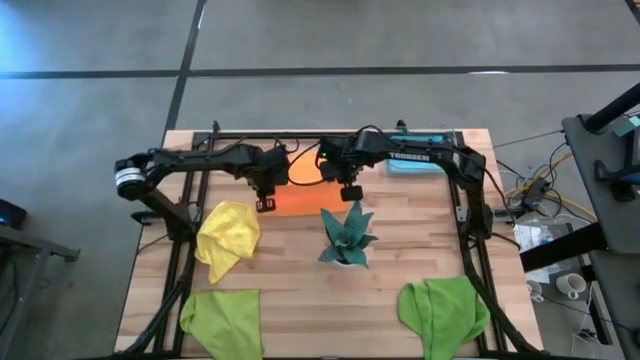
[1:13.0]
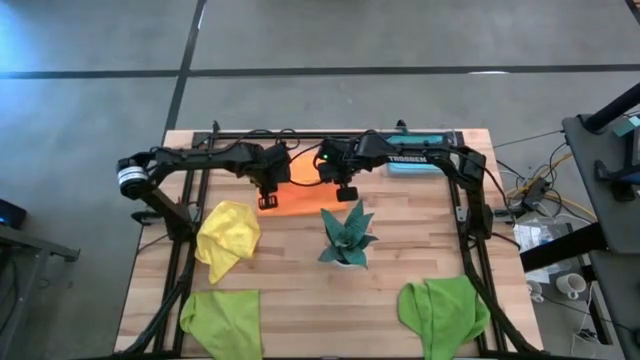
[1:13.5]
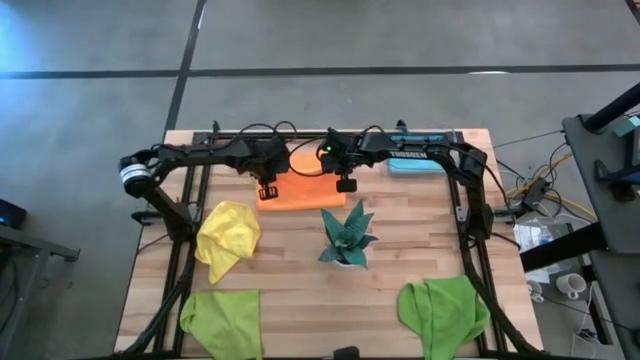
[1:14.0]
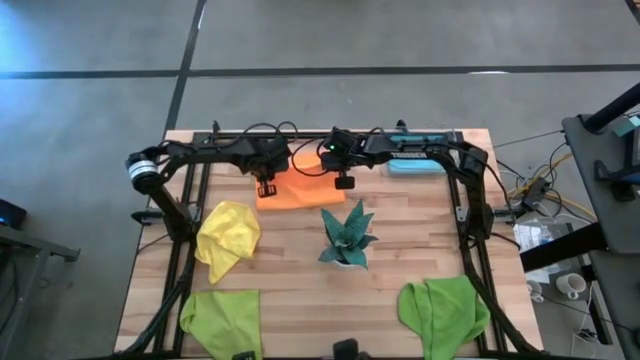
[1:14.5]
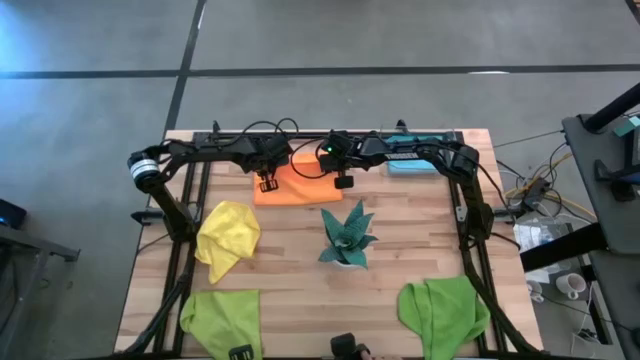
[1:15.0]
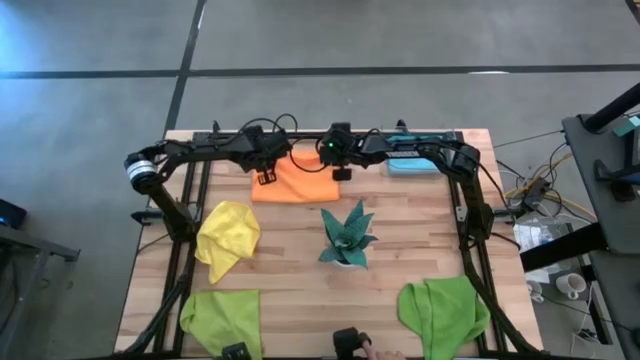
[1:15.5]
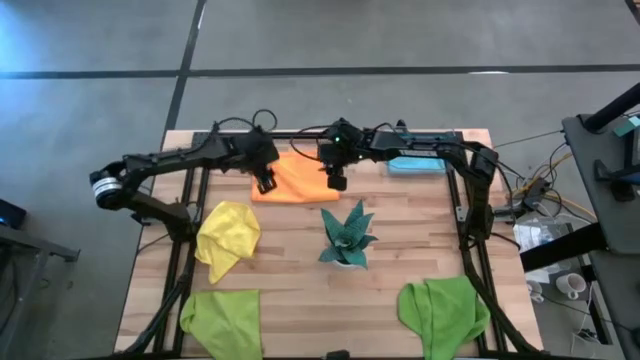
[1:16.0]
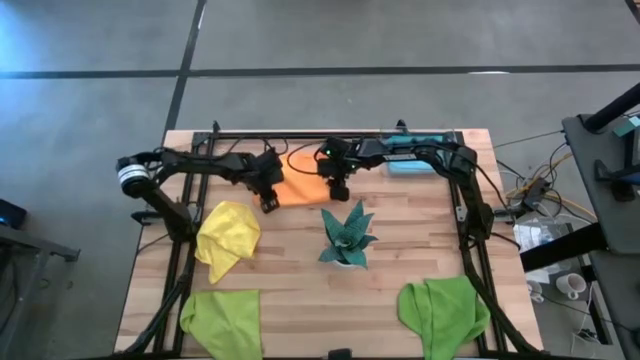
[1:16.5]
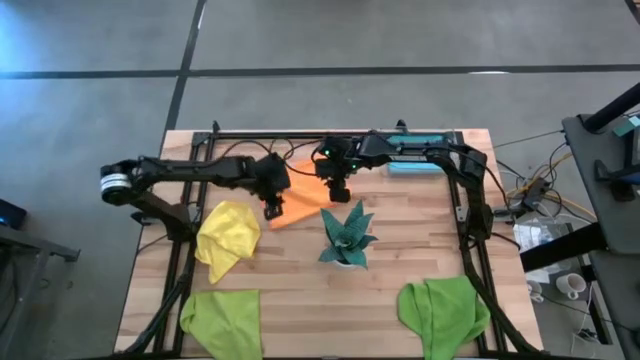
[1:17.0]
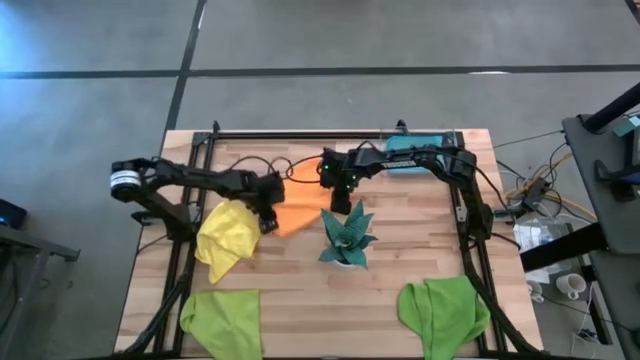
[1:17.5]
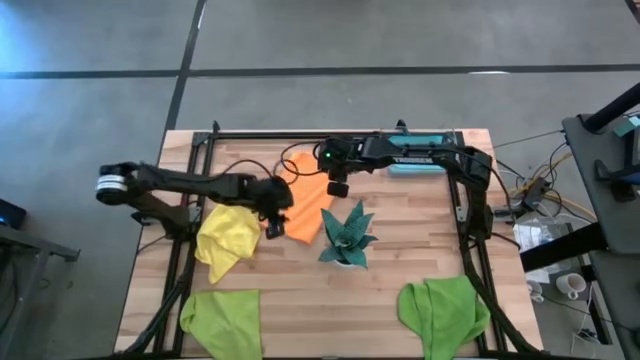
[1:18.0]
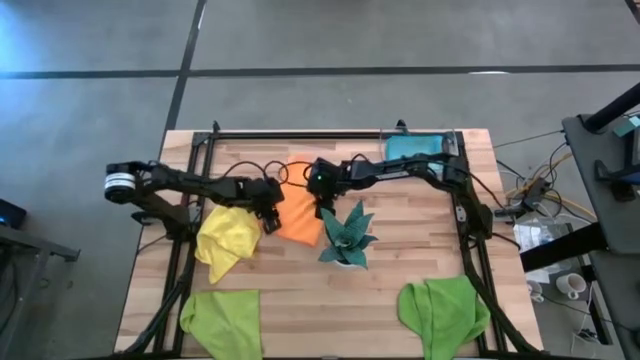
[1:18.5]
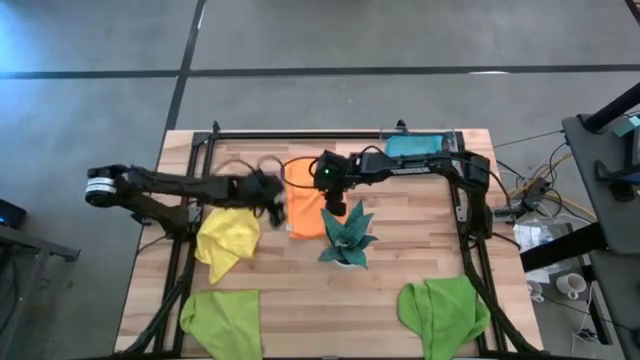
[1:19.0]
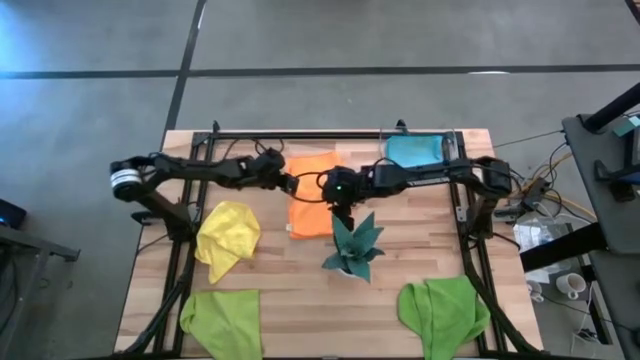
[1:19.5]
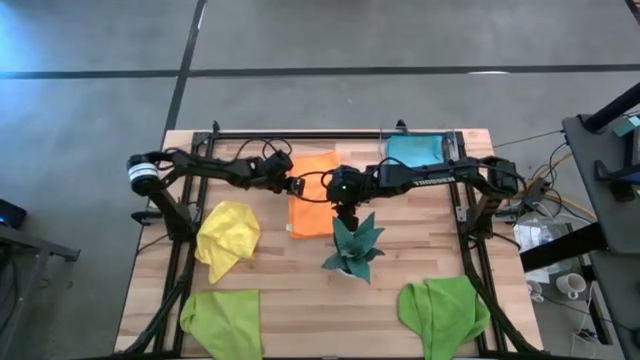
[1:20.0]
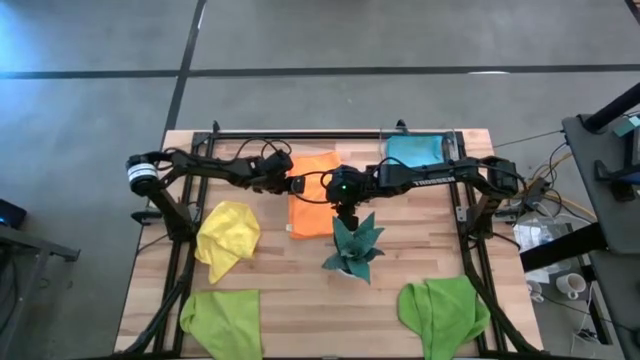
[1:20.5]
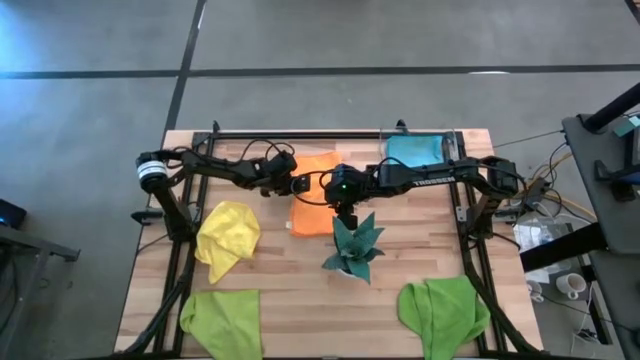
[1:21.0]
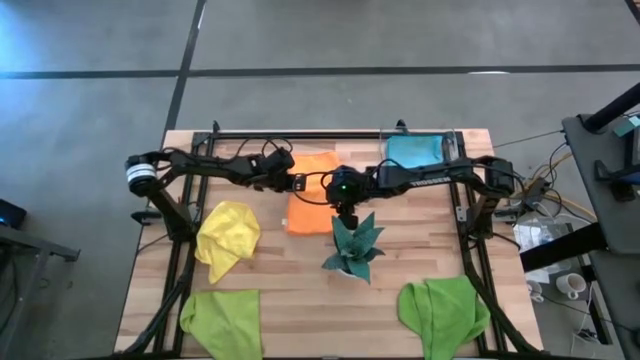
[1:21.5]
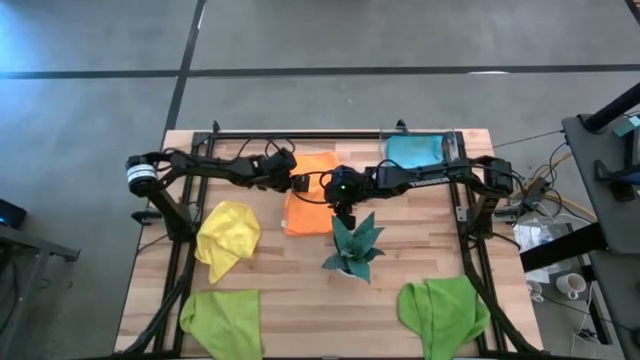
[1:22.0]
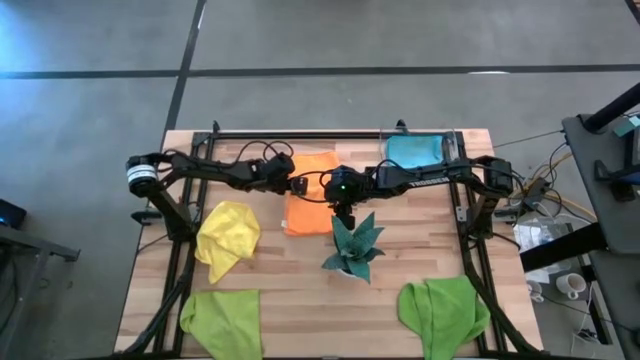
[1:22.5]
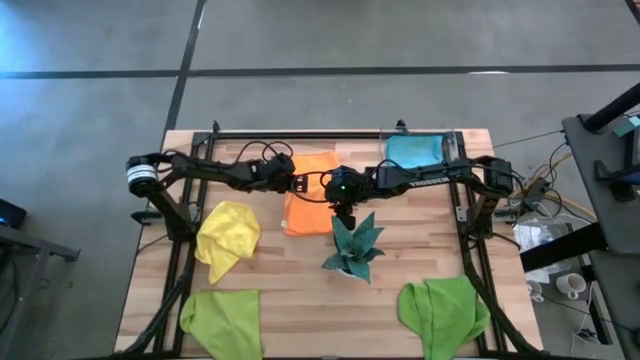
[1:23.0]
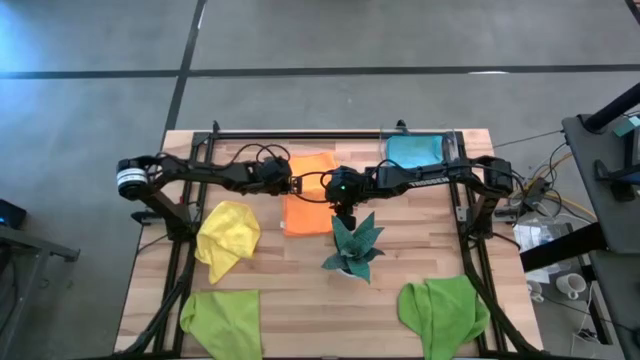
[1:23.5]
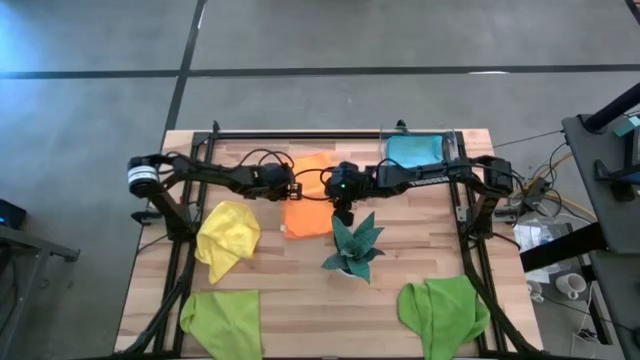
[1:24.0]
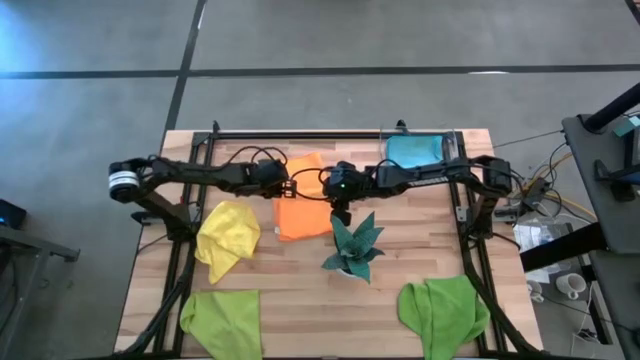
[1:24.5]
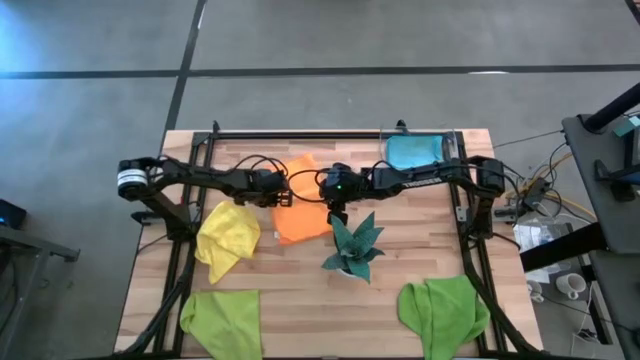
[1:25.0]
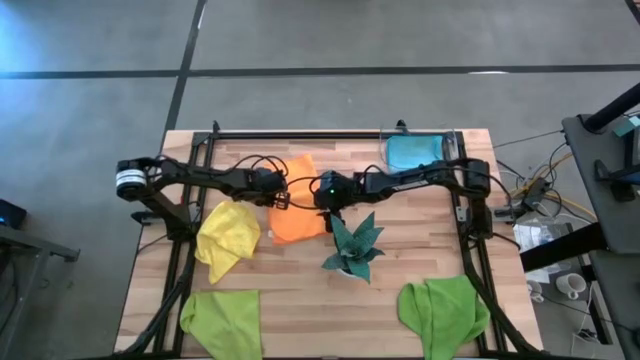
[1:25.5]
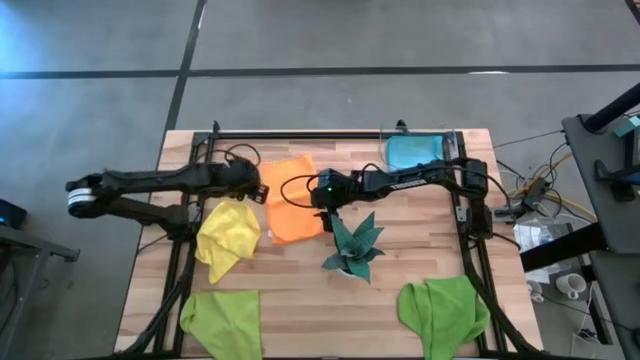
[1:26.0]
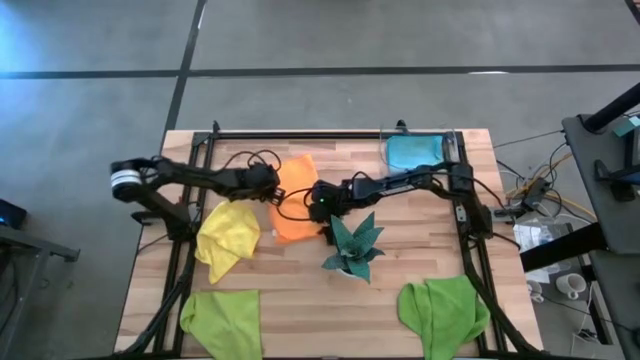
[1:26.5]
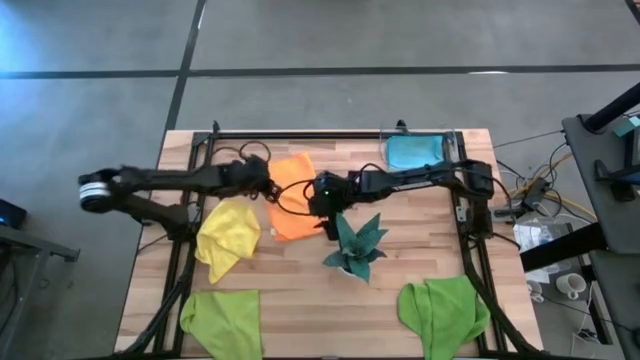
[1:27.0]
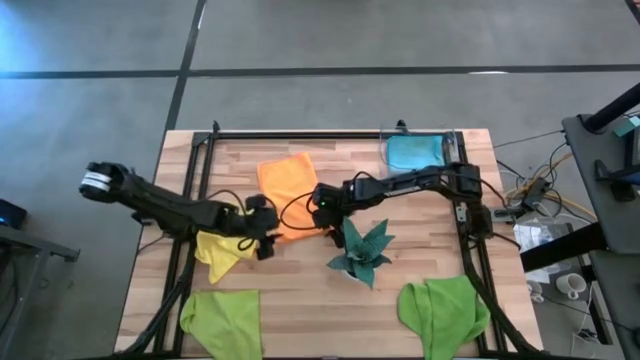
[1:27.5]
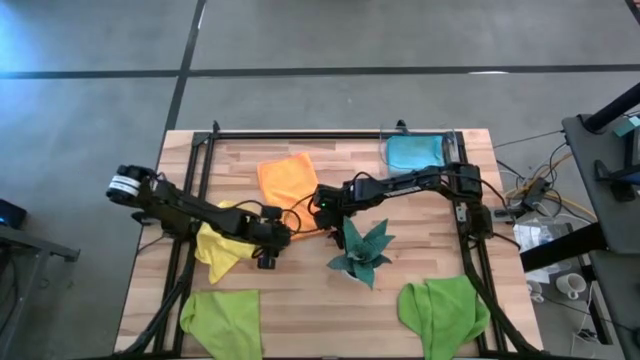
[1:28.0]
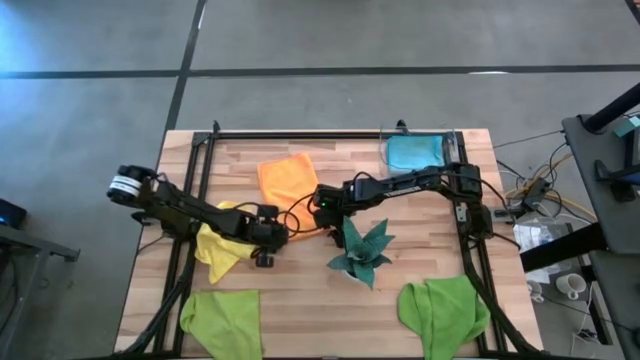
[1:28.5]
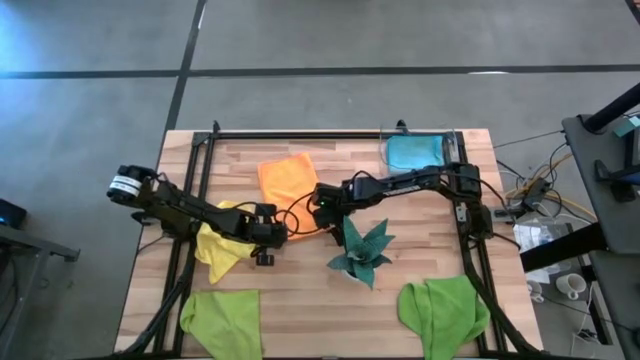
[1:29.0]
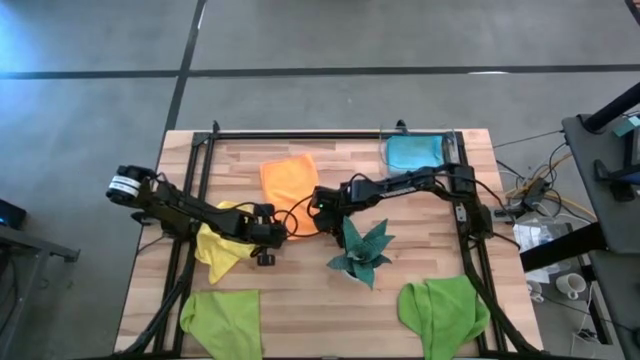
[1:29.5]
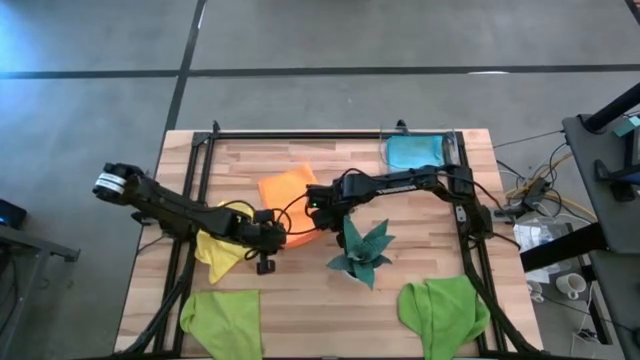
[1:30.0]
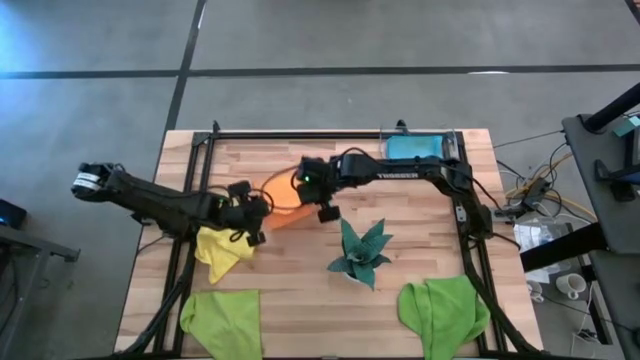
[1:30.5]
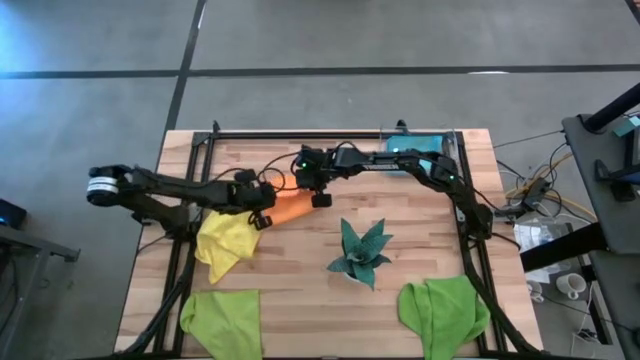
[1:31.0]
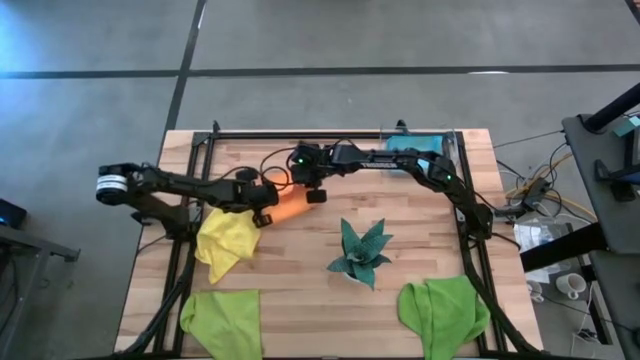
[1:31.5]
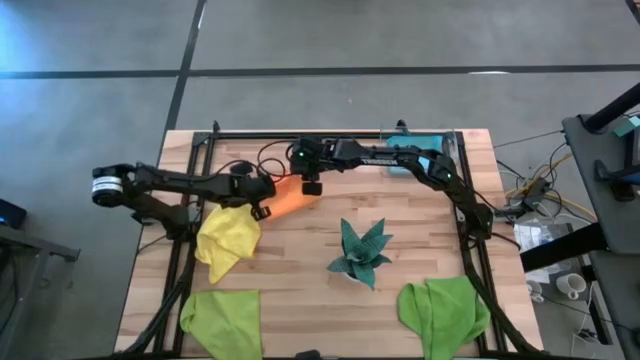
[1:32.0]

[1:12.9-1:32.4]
Task: Fold microfiber towels
Fold the orange microfiber cloth

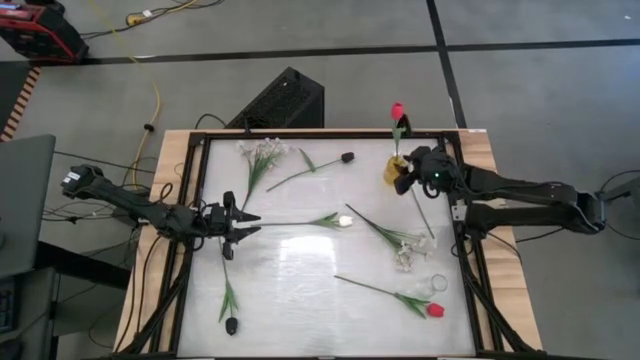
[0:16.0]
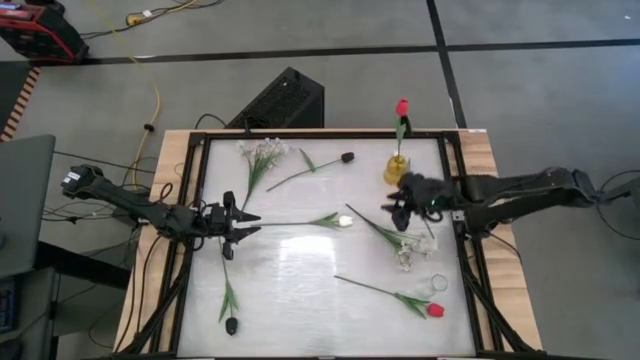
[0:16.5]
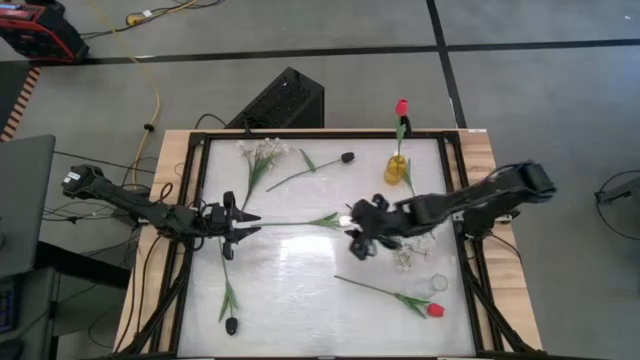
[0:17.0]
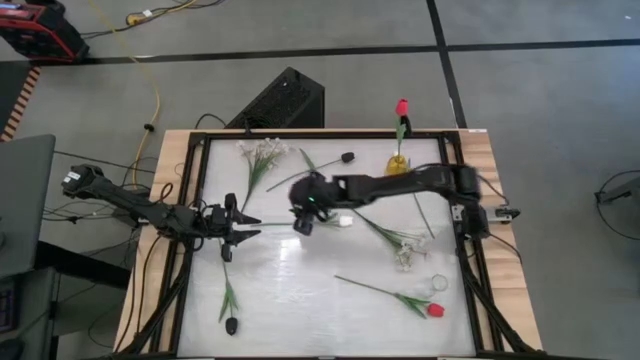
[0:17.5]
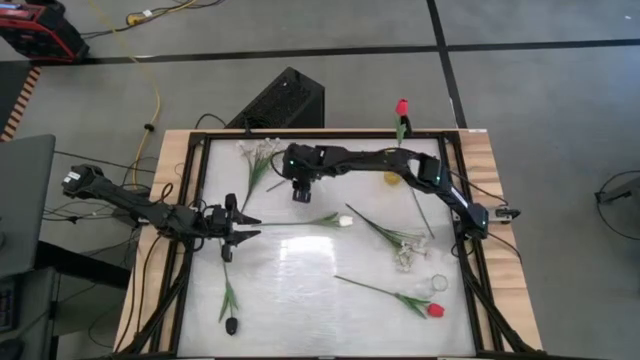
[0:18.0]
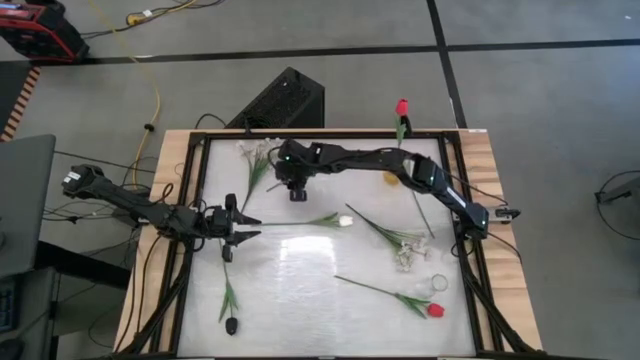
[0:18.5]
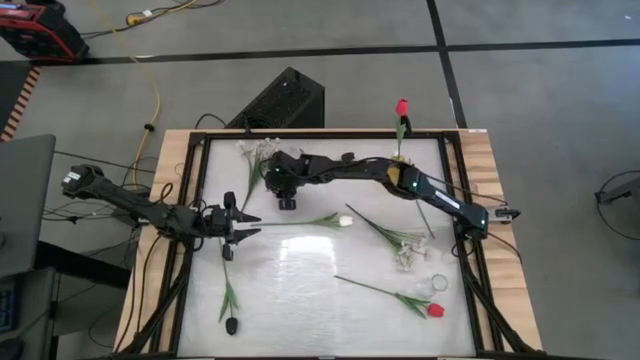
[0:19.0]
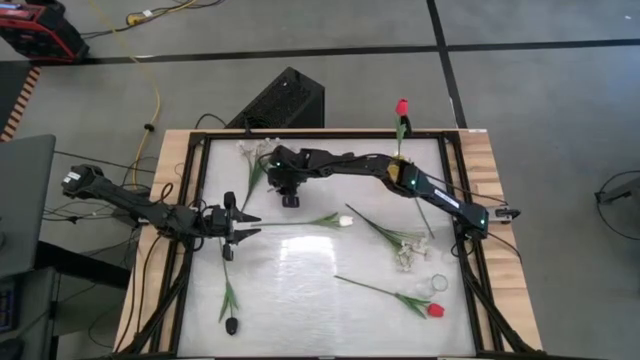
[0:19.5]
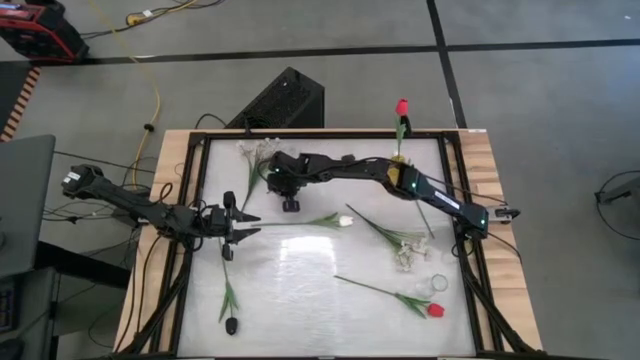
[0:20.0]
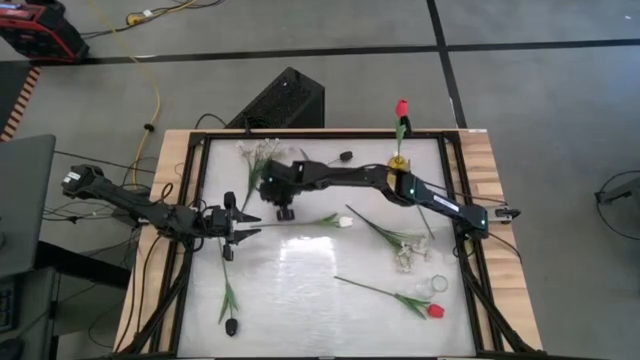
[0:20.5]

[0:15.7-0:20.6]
Task: Sort flowers into vase by color
Put the top black flower into the yellow flower vase
